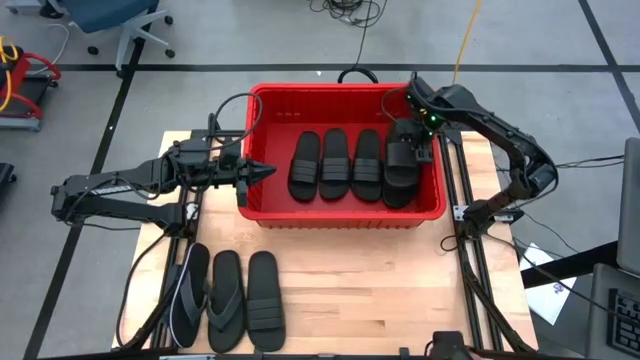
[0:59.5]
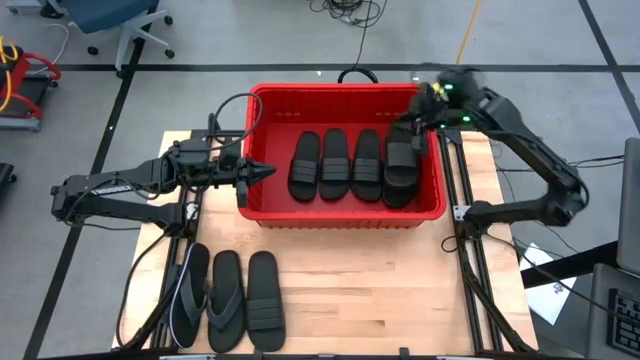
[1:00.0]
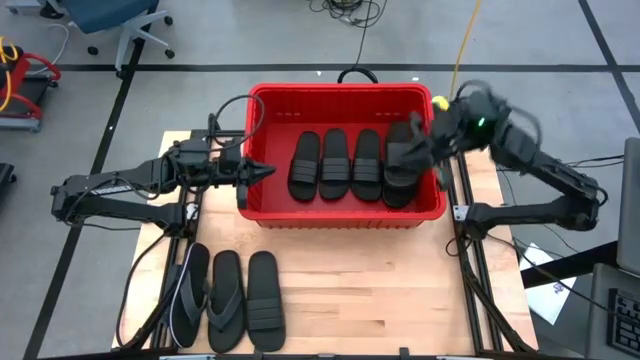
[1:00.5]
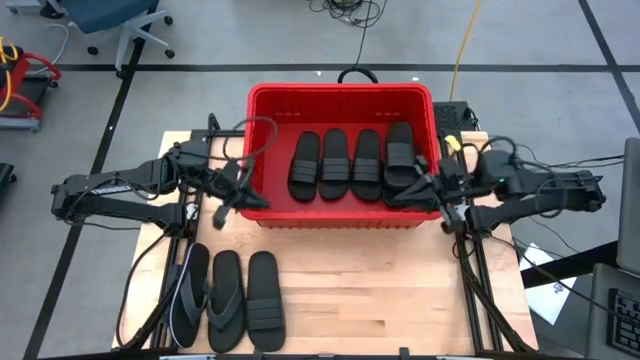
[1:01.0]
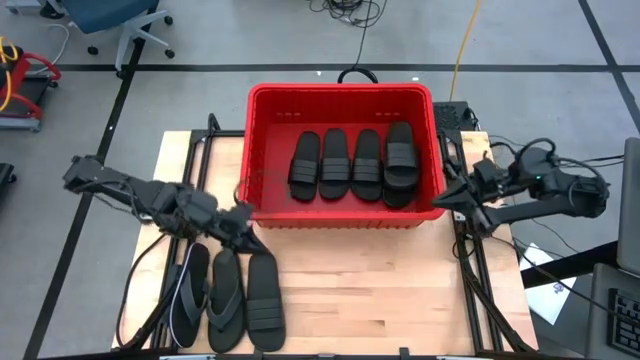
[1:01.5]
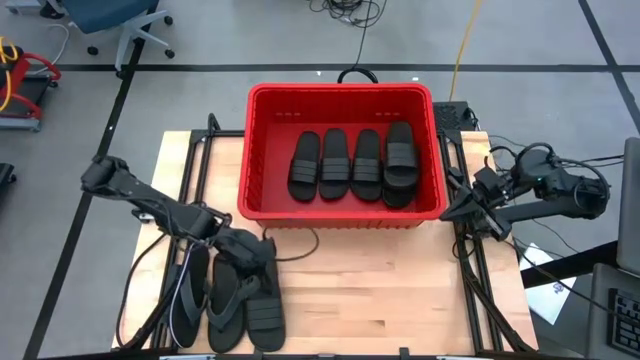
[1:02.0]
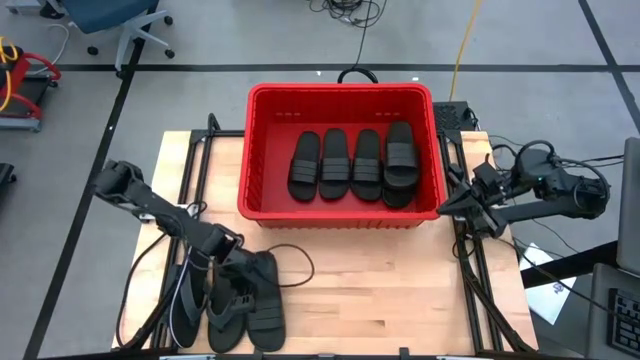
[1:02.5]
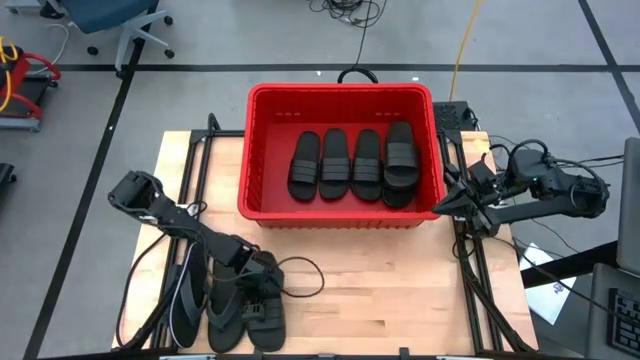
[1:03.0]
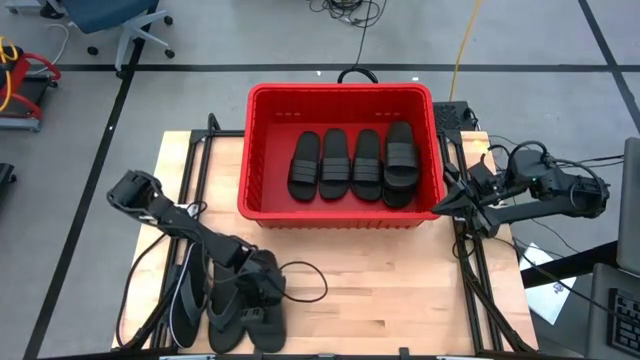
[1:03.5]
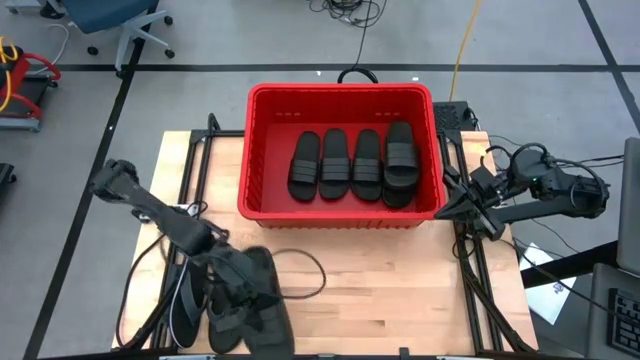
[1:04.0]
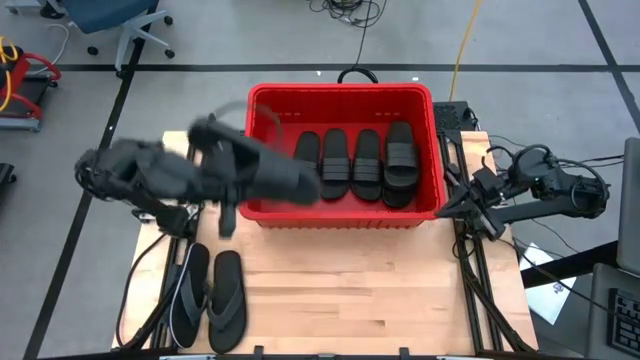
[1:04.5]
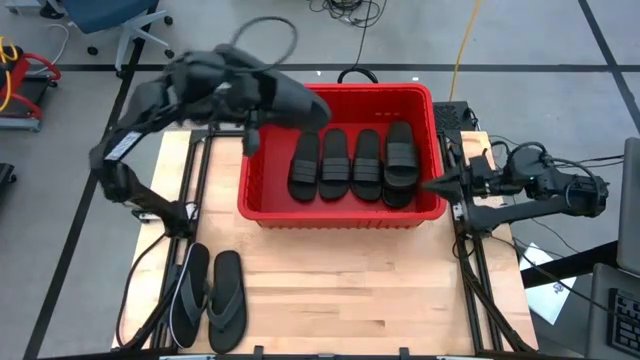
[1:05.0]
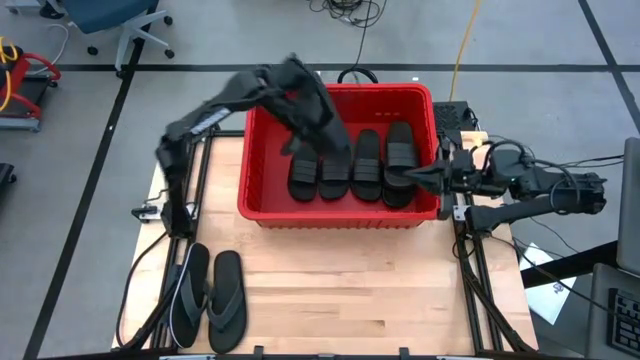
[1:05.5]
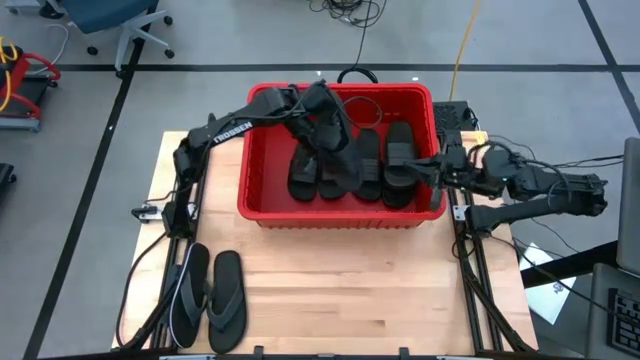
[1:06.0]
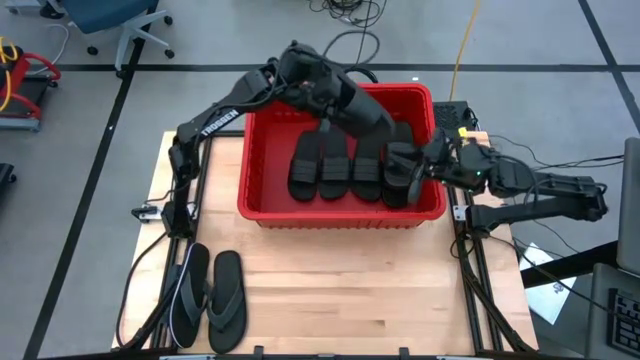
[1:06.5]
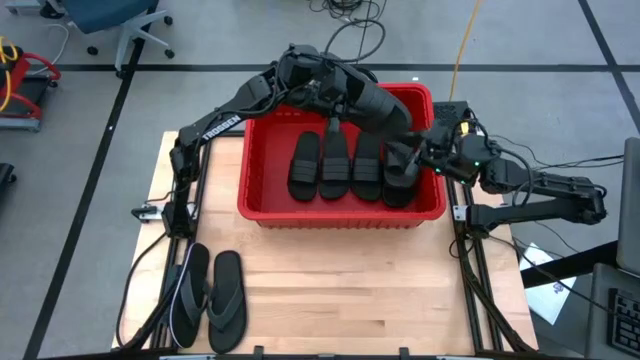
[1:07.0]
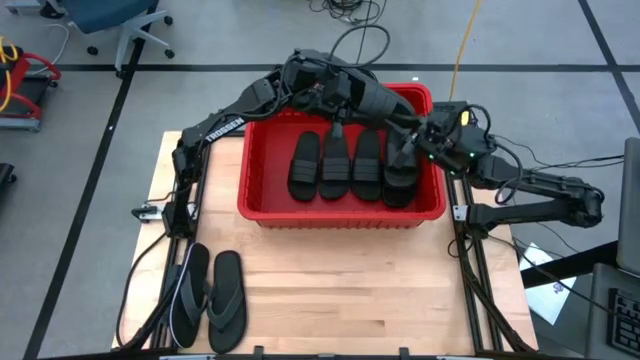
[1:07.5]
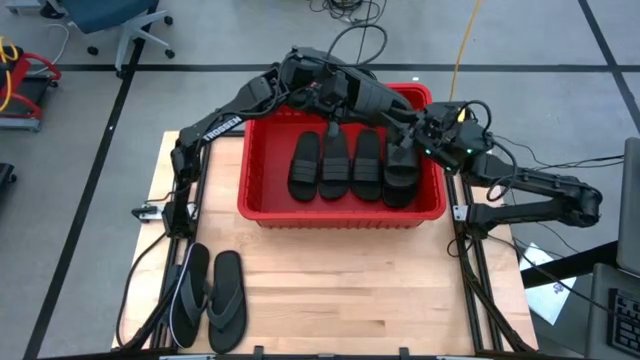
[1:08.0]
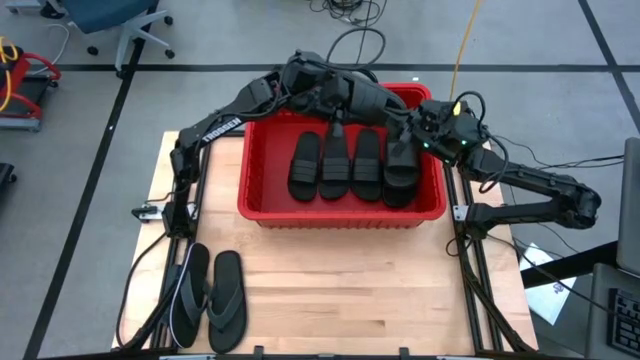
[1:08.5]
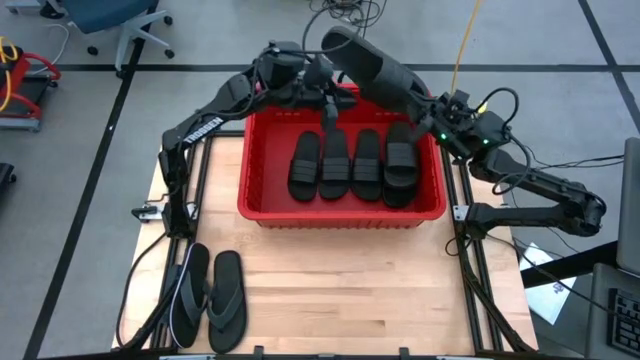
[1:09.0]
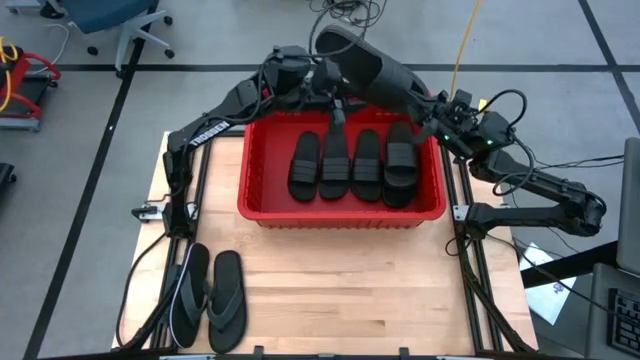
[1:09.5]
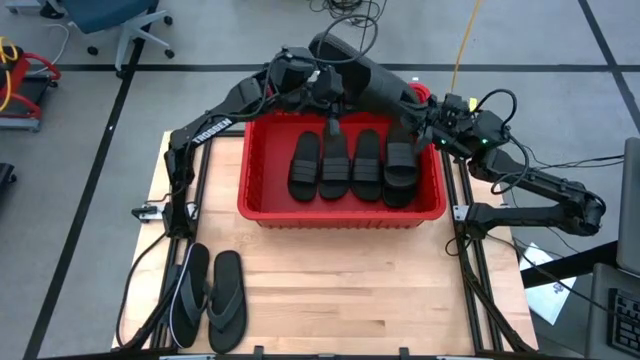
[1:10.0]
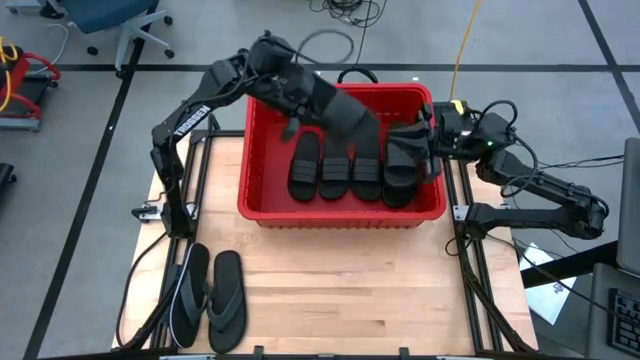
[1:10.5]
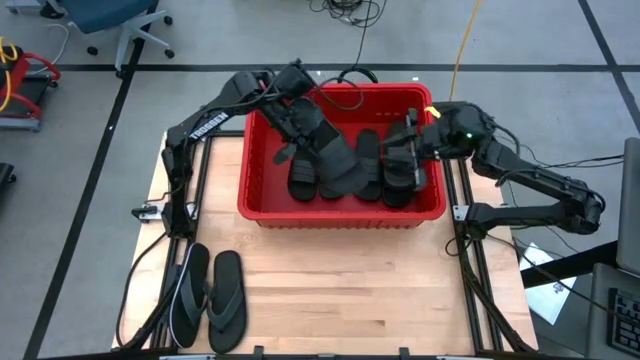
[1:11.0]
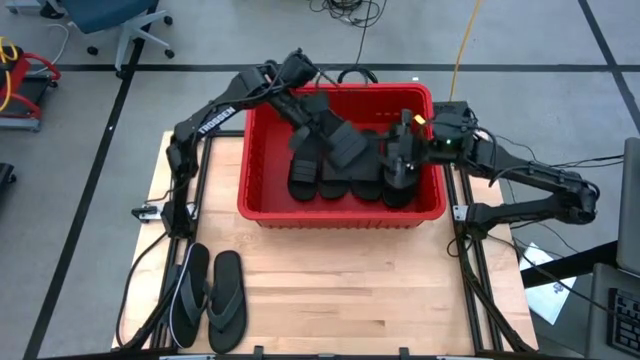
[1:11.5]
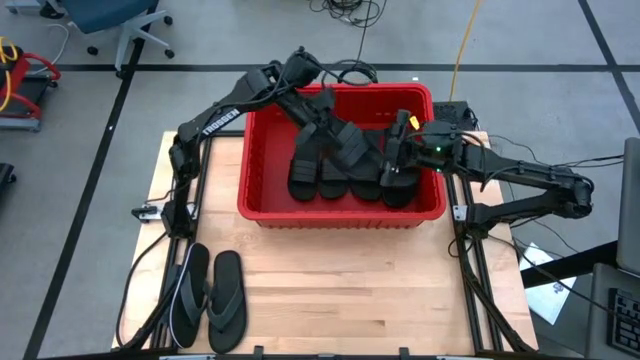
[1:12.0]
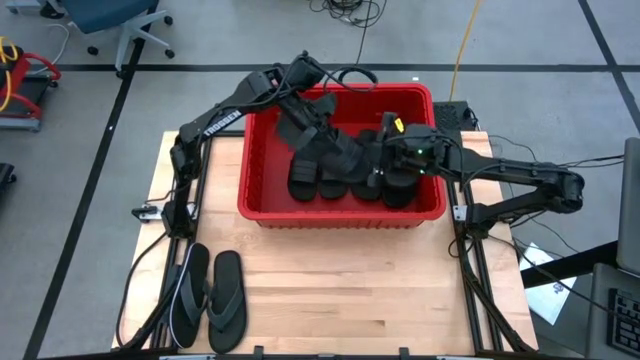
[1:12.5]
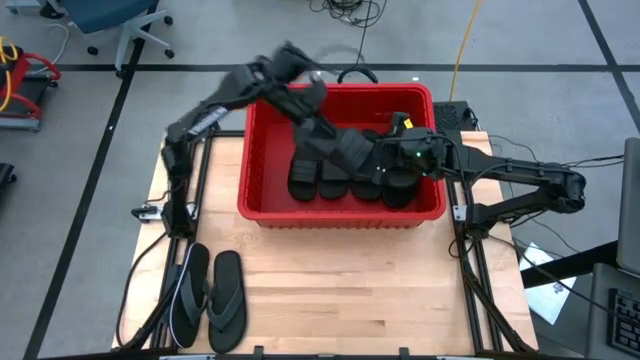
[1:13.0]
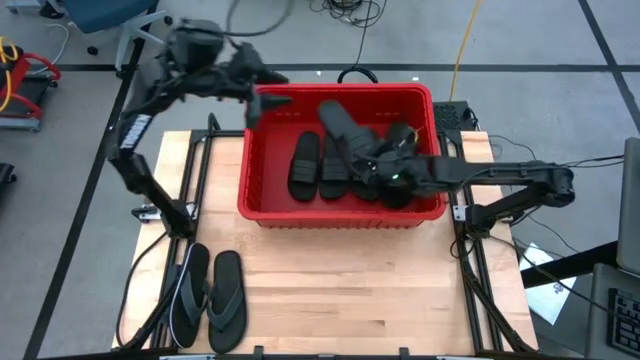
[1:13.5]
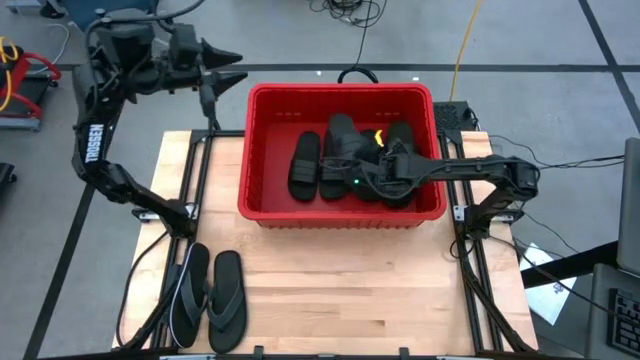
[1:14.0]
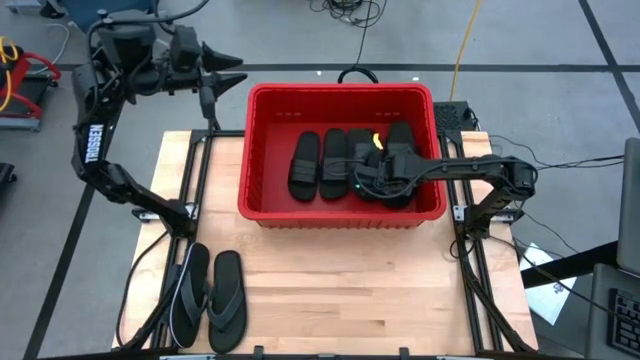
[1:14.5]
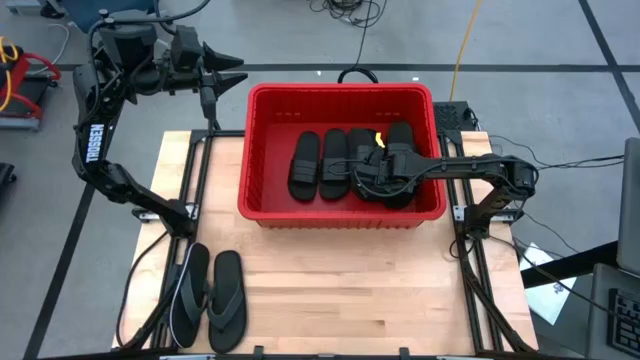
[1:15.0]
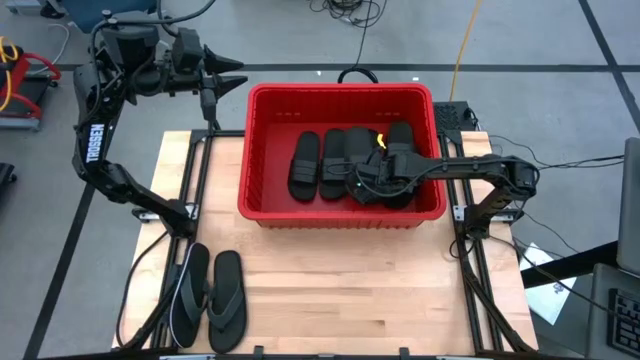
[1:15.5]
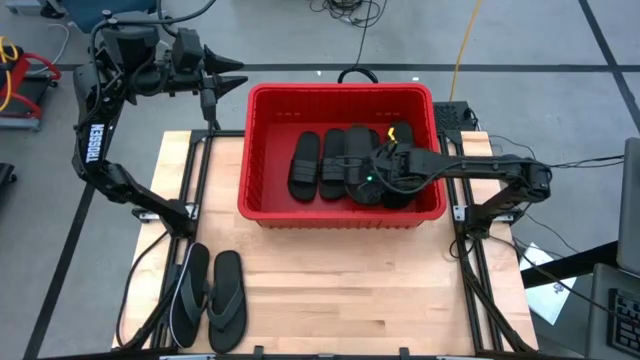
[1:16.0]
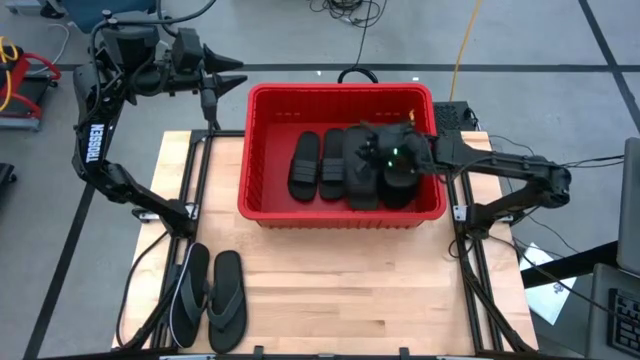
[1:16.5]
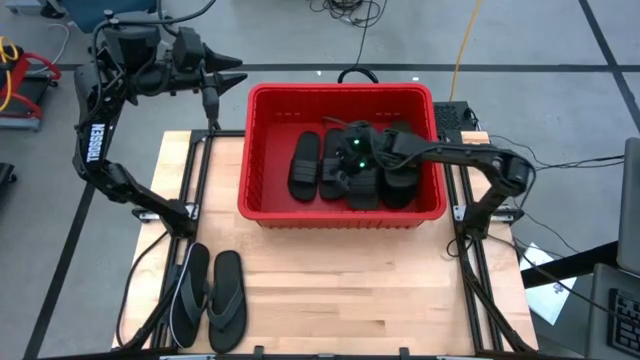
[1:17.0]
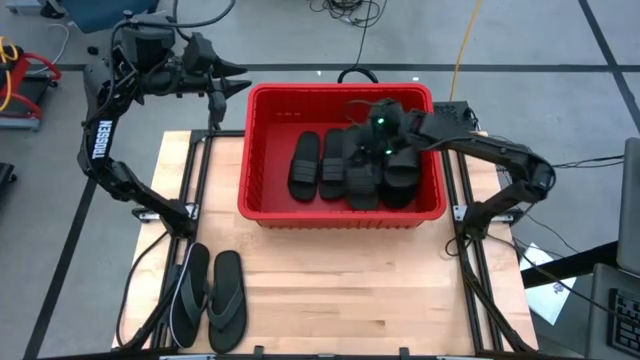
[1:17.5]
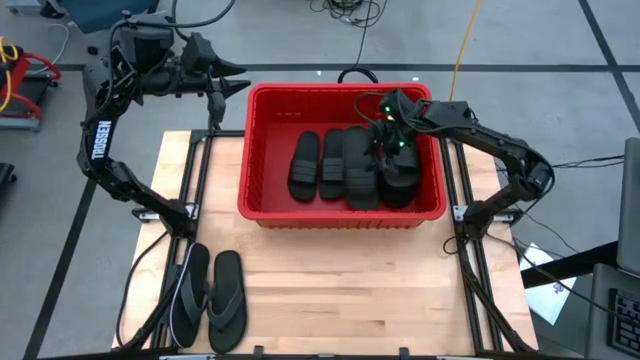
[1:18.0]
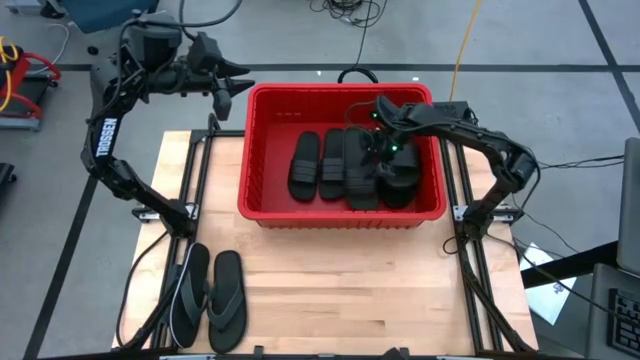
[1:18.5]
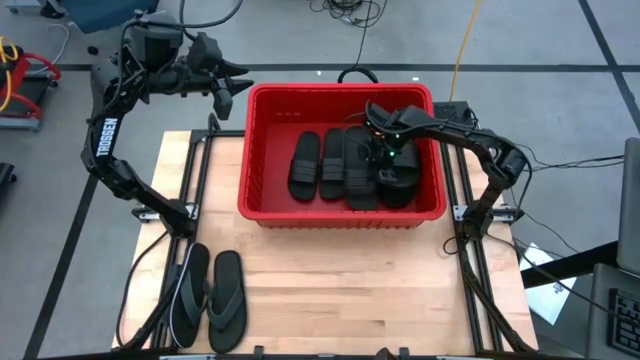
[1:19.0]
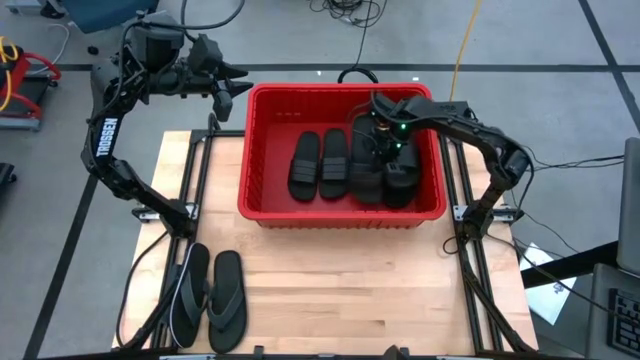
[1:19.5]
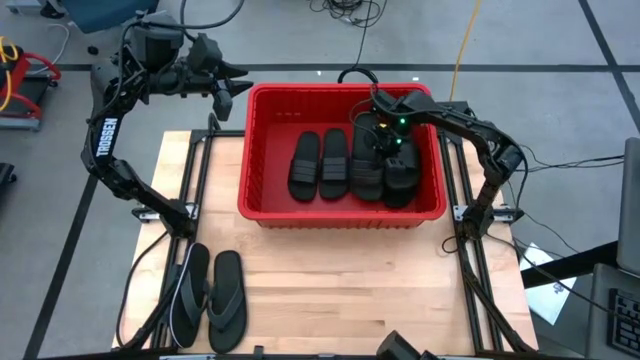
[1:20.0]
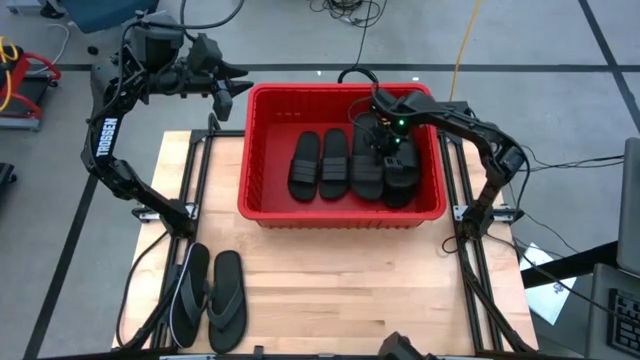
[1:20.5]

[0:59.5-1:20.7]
Task: Pick and place slides into bin
Put the black slide into the red bin
